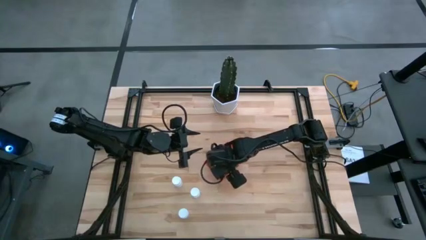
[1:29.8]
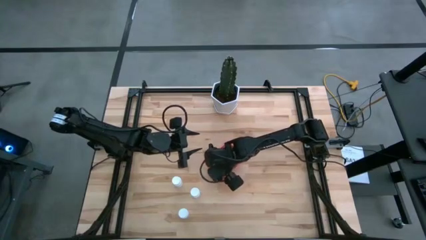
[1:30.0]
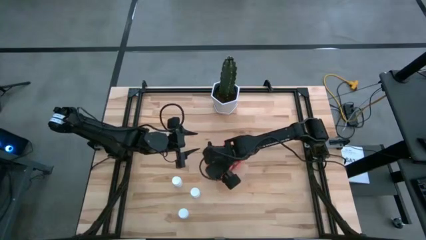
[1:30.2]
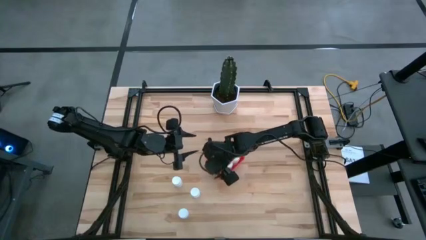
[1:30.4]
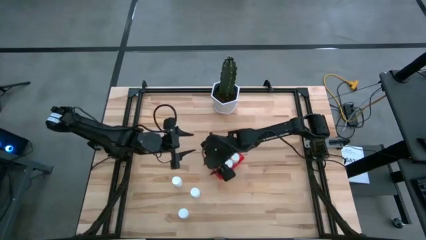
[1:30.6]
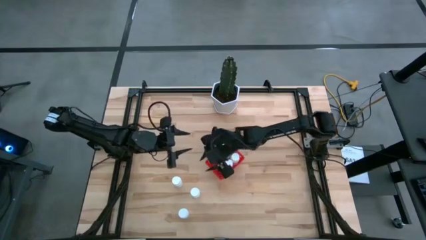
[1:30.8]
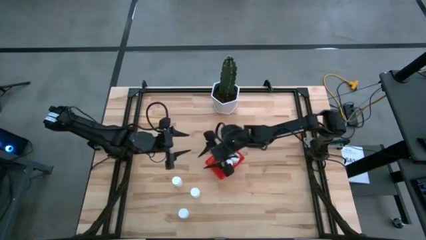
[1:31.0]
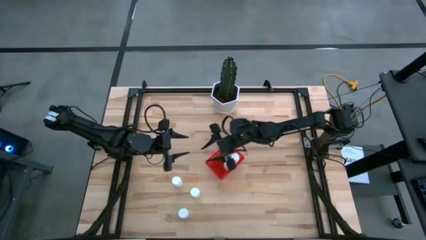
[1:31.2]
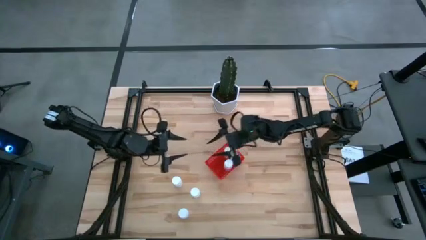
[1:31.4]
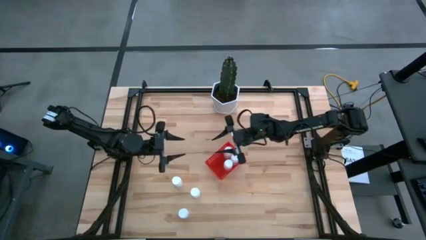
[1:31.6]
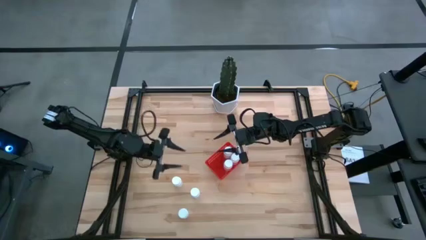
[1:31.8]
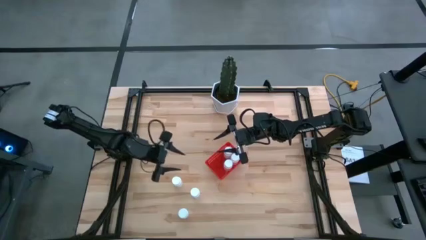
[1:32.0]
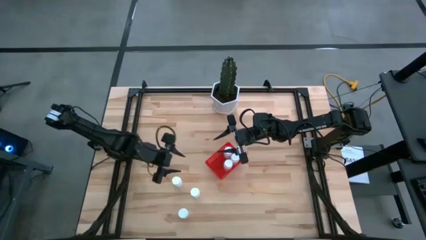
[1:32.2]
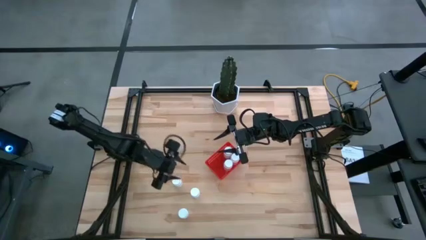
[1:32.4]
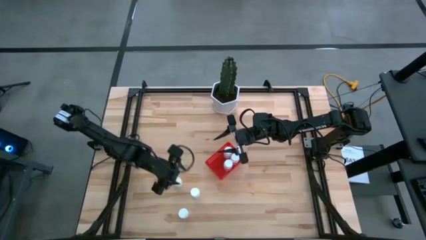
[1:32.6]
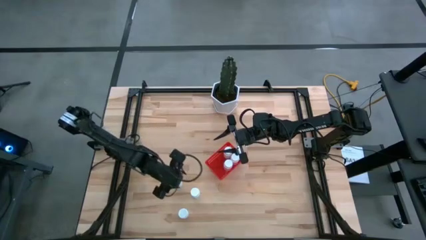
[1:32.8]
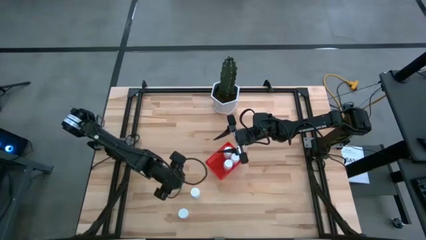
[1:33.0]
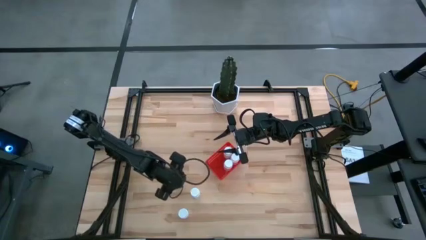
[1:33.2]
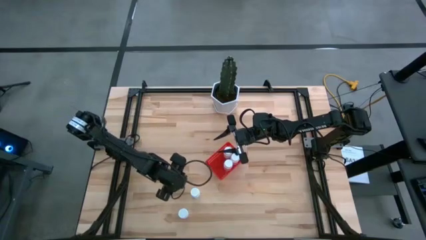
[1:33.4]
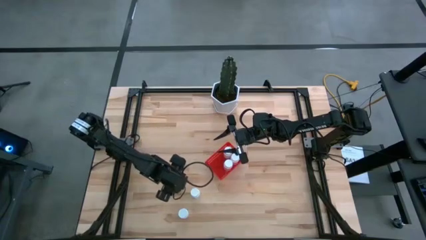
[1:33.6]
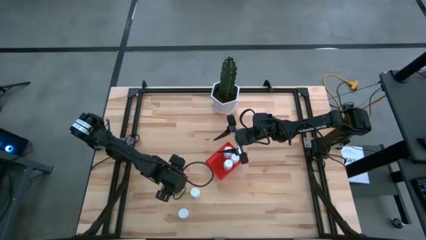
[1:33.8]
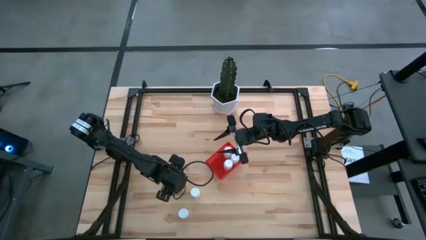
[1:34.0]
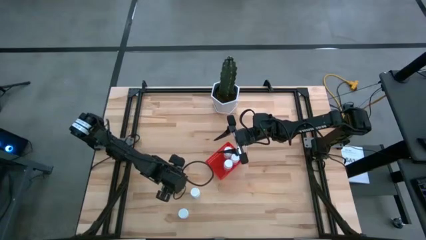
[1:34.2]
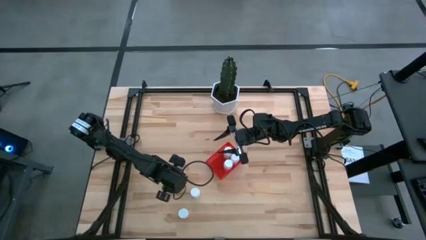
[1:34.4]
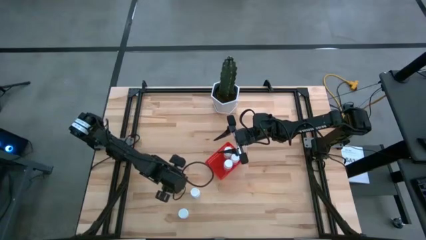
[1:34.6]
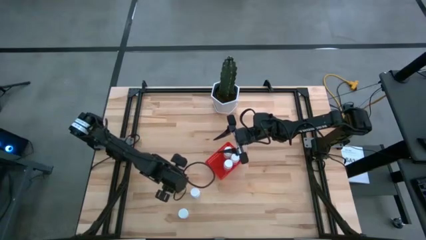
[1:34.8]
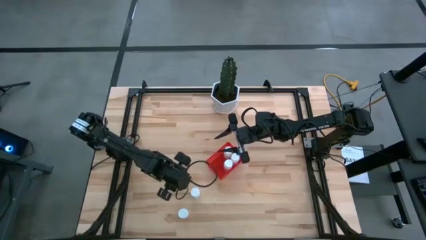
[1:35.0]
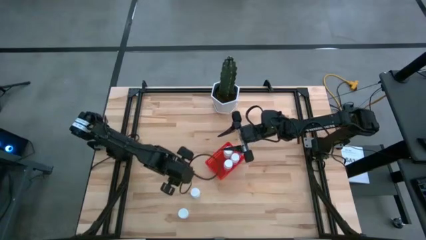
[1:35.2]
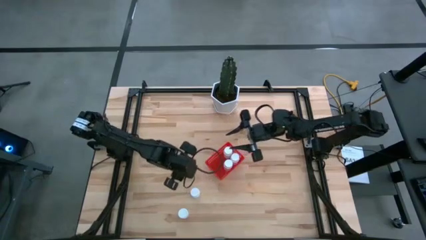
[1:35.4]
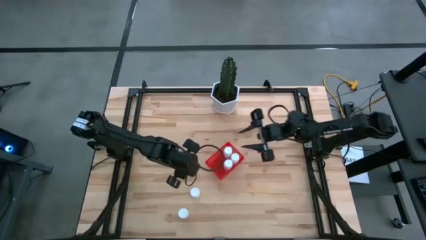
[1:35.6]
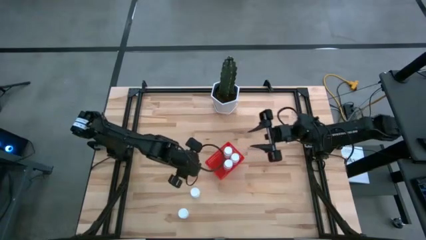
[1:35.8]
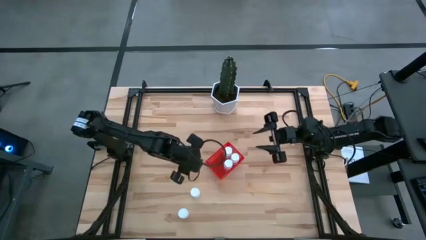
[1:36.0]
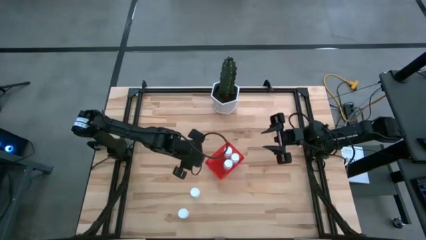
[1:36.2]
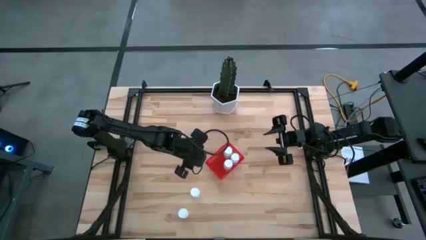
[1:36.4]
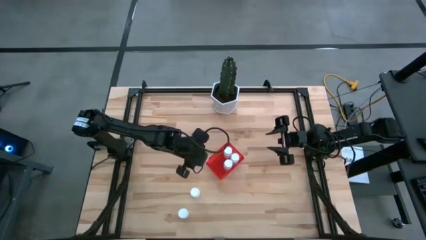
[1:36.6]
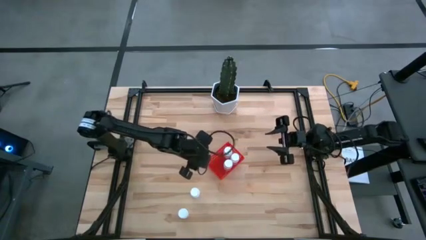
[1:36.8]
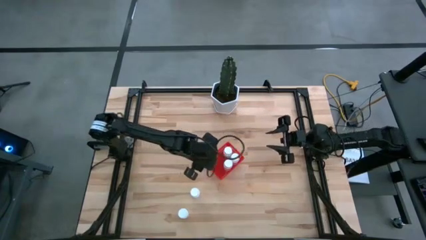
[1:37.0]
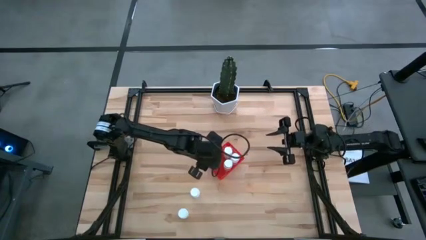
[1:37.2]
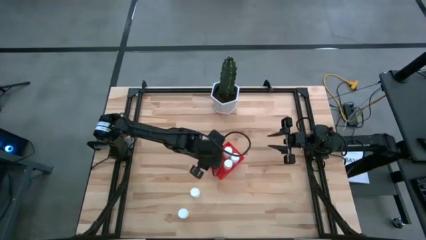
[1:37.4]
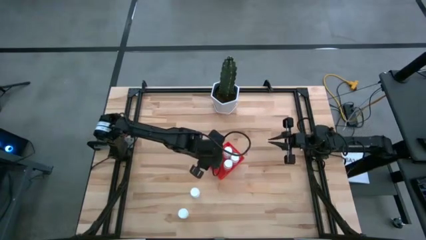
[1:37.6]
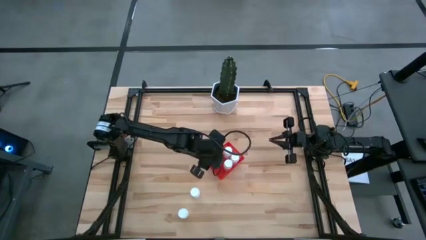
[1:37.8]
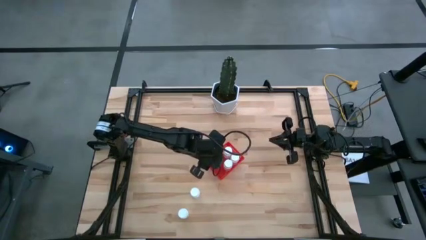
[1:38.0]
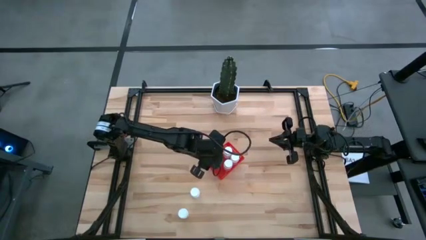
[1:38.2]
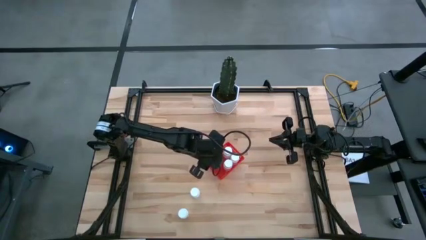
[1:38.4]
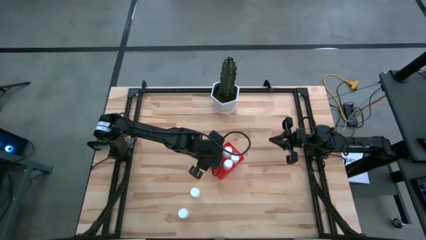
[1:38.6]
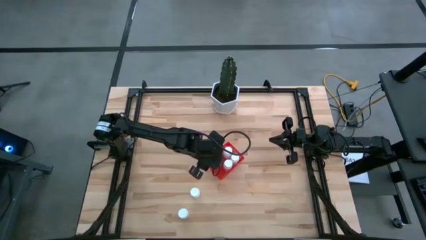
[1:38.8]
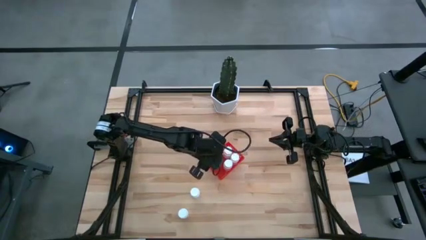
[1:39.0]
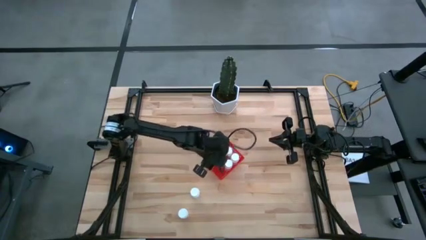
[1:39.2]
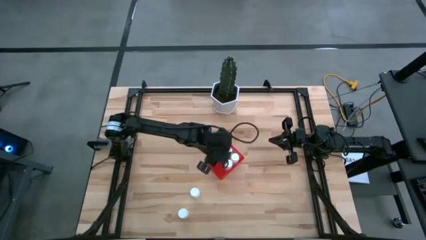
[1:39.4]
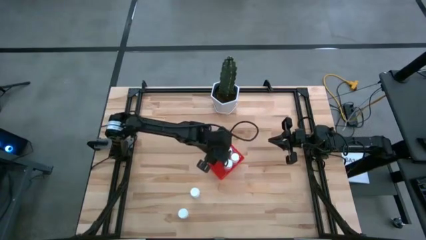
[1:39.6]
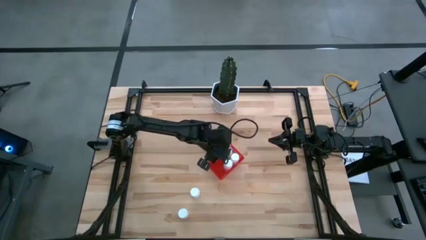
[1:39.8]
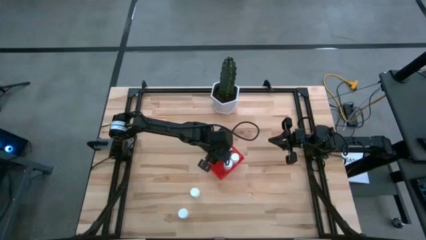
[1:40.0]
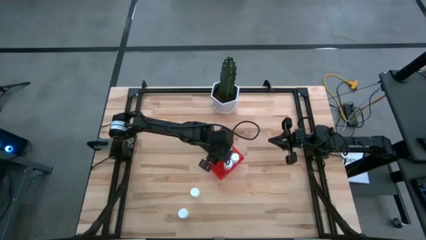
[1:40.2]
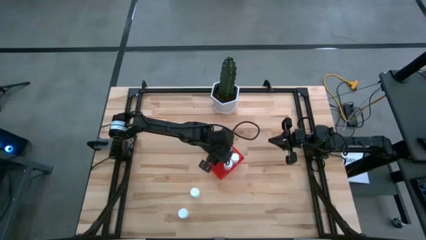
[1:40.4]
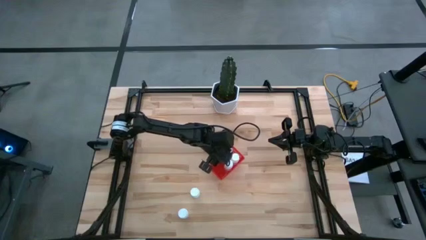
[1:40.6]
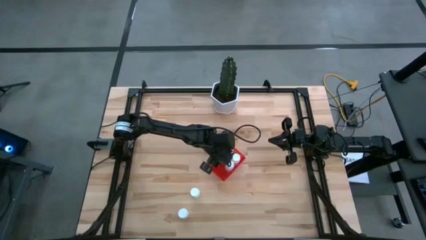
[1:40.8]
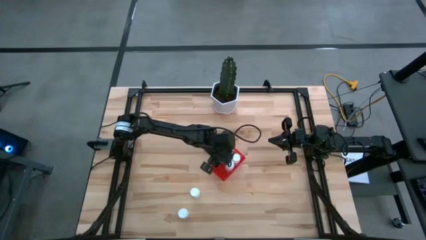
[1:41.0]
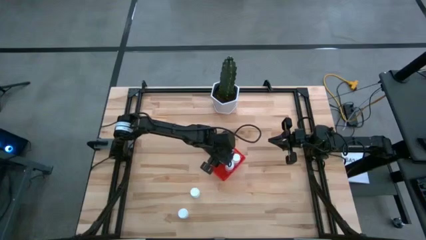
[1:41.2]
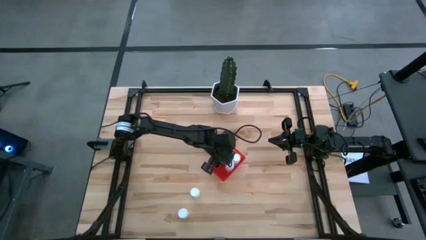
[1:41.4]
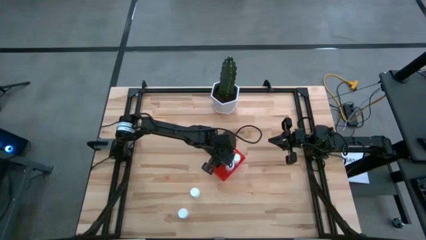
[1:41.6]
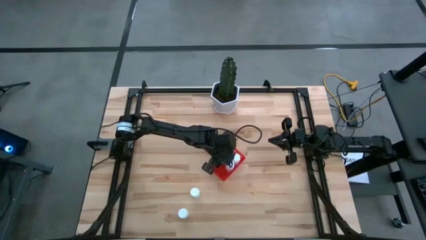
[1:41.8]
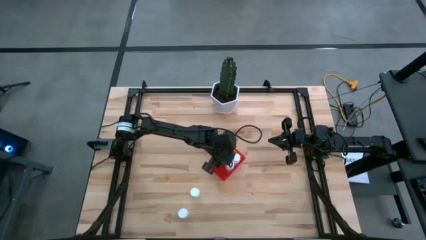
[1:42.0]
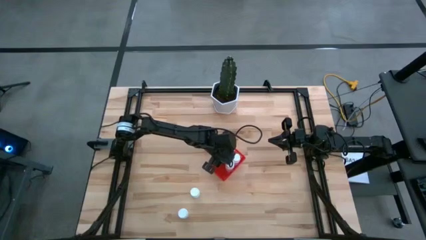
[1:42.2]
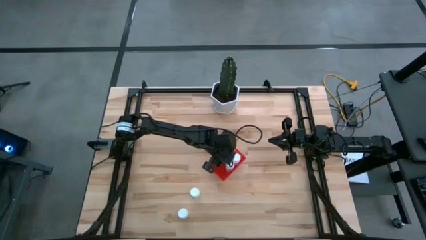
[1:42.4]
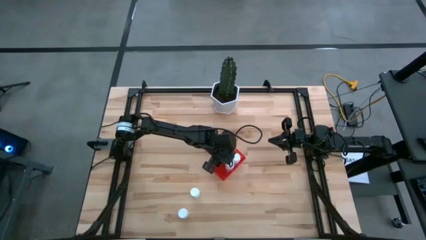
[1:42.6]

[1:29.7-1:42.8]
Task: Pick and place pill bottles into a basket
Put the white pill bottle into the red bin

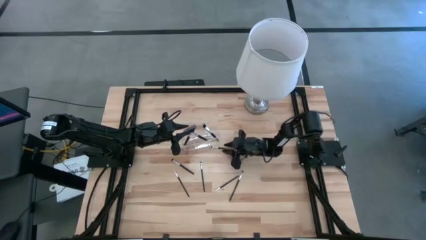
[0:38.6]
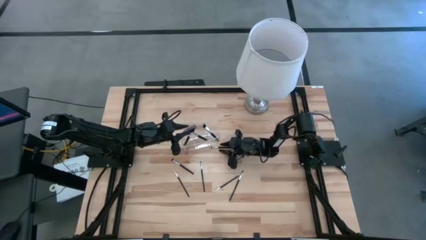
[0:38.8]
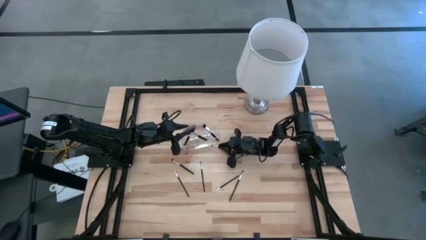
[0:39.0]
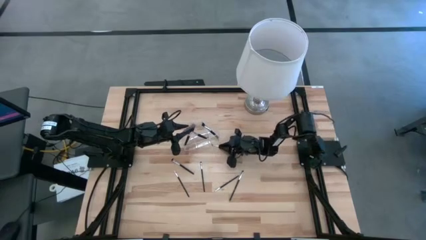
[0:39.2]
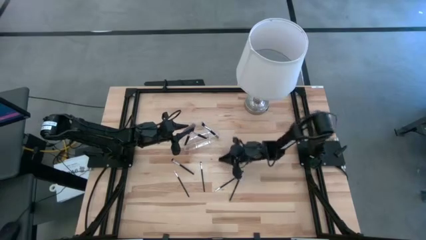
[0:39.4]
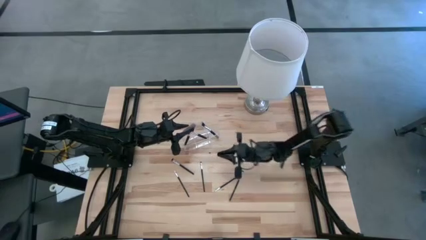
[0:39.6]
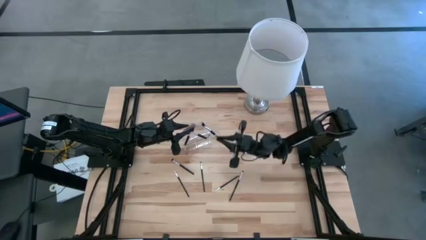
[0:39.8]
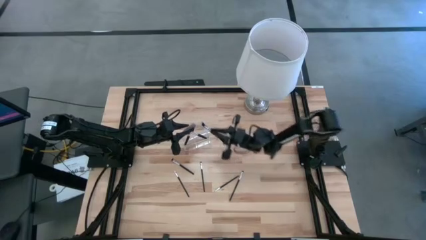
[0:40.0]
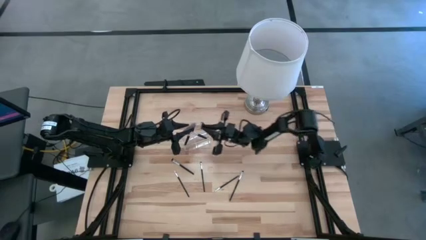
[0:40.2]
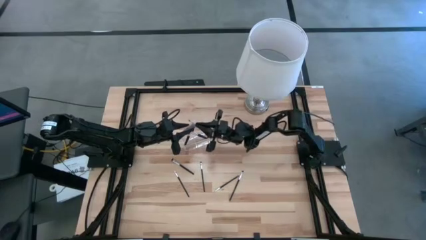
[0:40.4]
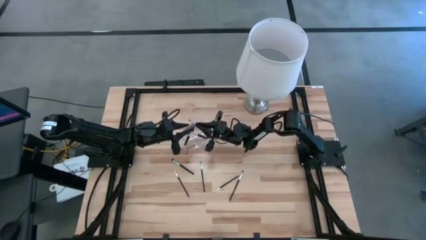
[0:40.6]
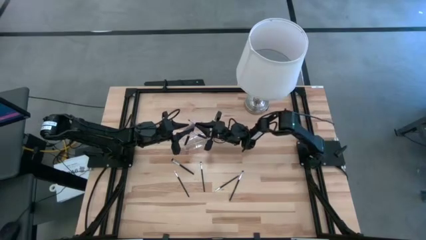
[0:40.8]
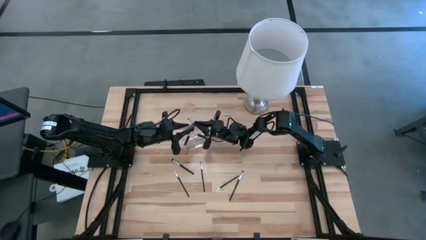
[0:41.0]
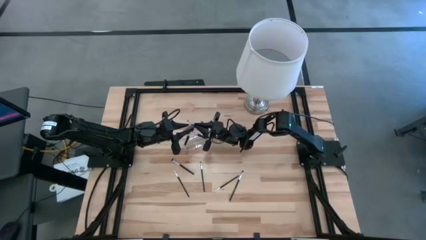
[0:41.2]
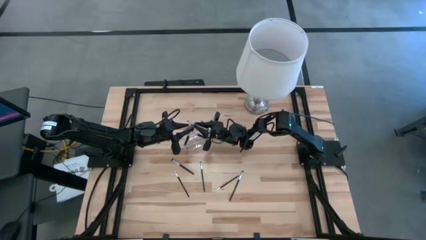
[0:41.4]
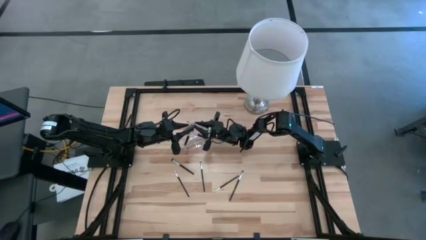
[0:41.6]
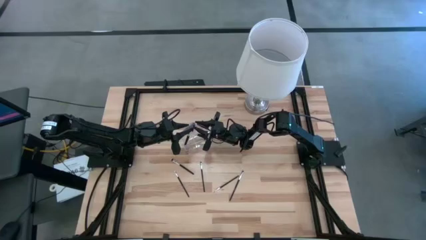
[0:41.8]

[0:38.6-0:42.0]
Task: Put items in baskets/containers
Put the eyeshadow brush into the right transparent organizer
